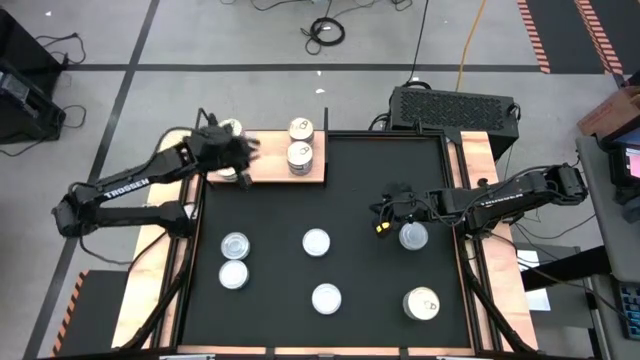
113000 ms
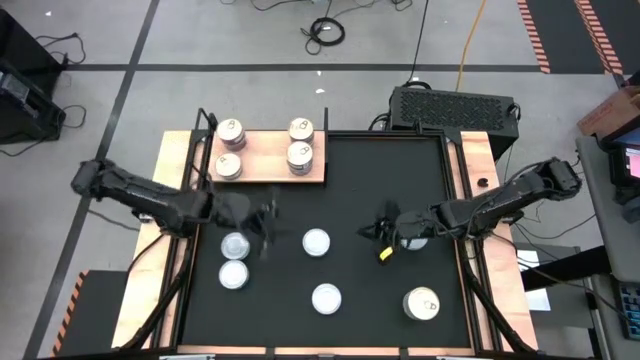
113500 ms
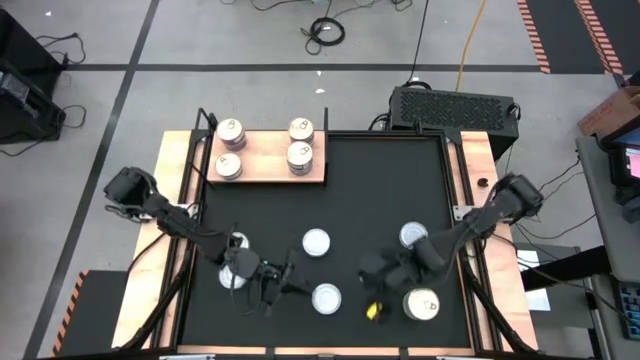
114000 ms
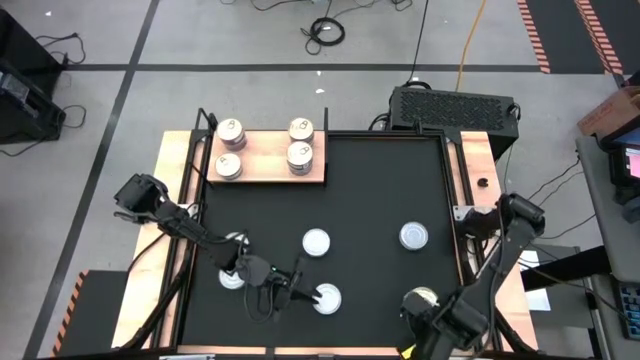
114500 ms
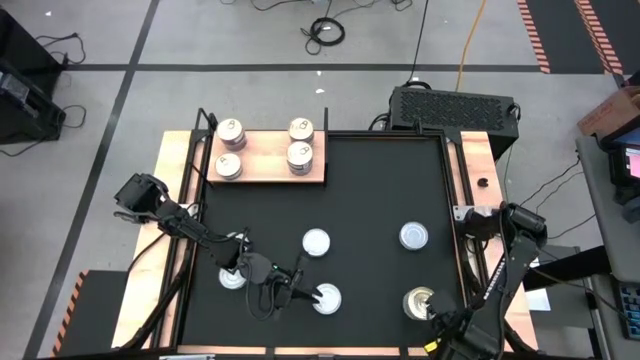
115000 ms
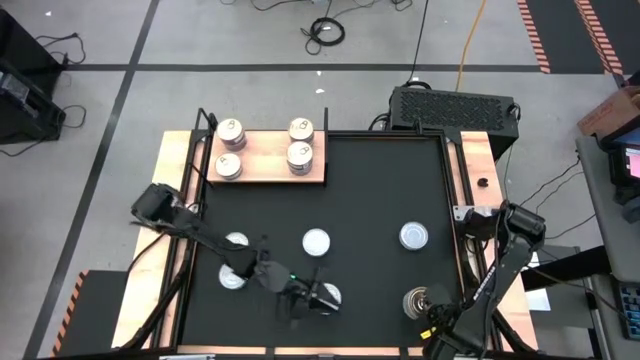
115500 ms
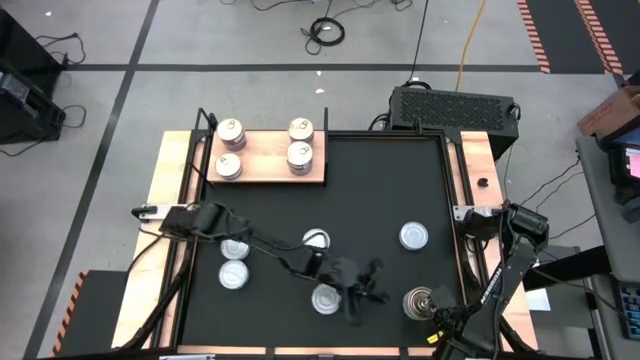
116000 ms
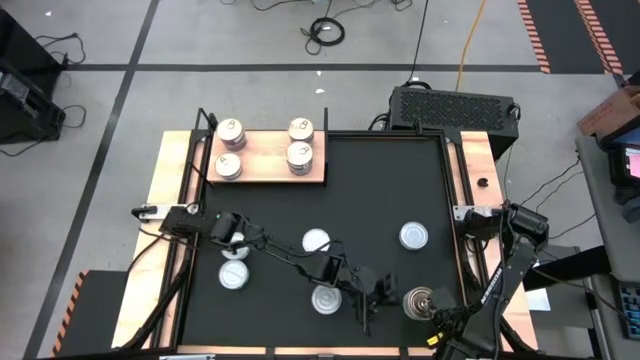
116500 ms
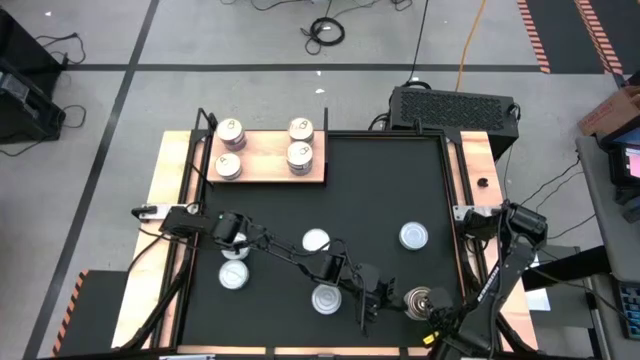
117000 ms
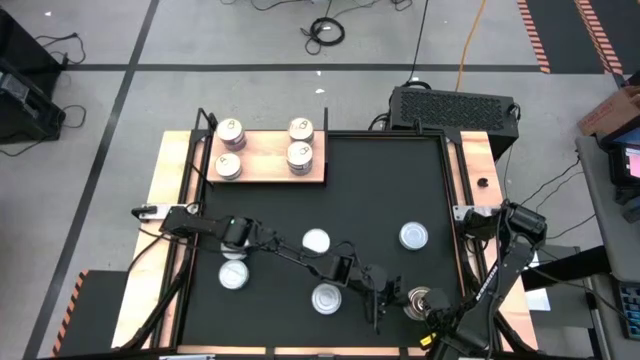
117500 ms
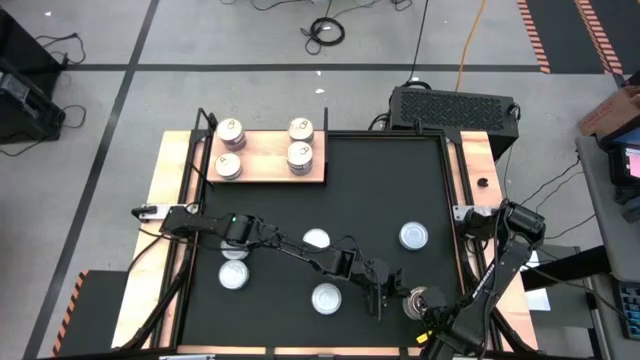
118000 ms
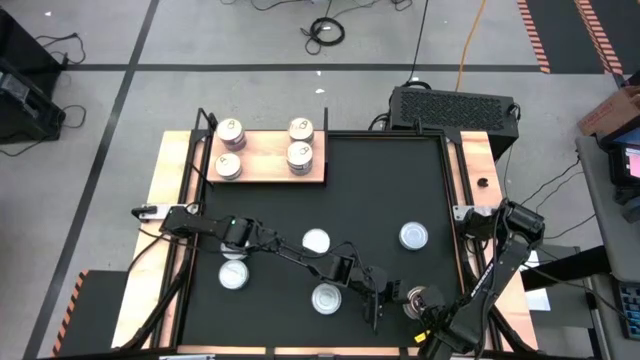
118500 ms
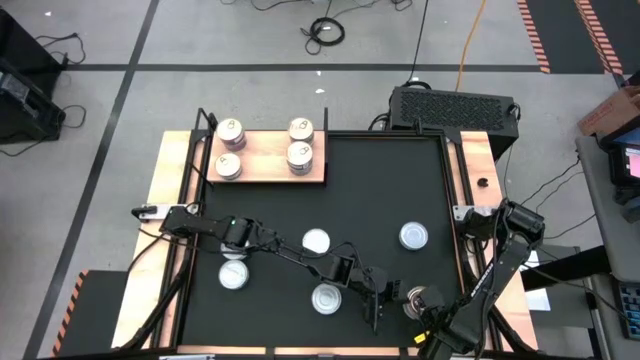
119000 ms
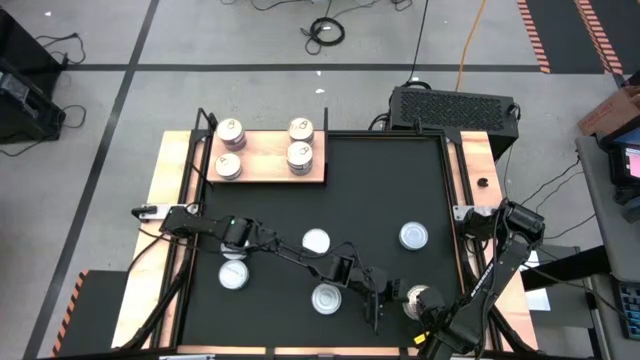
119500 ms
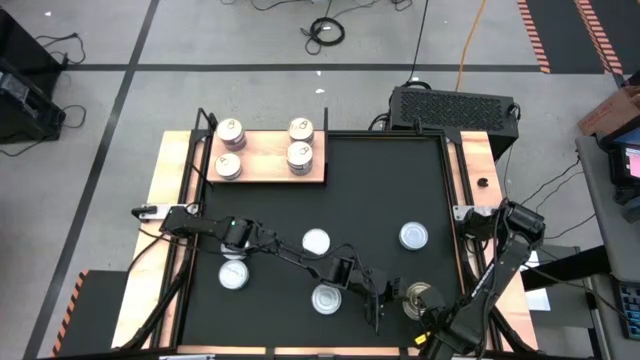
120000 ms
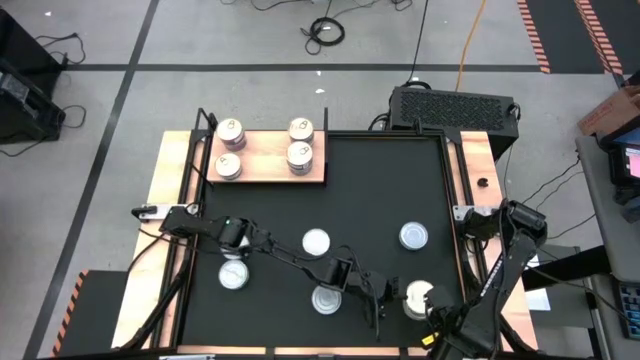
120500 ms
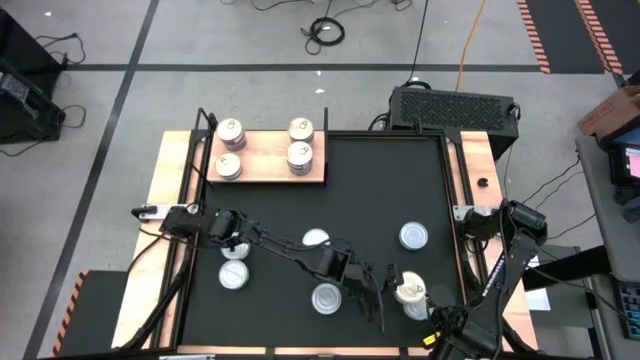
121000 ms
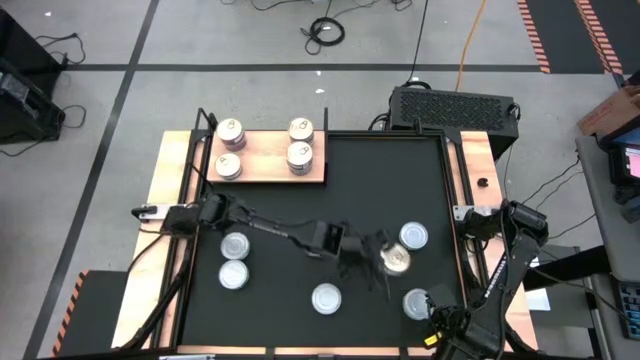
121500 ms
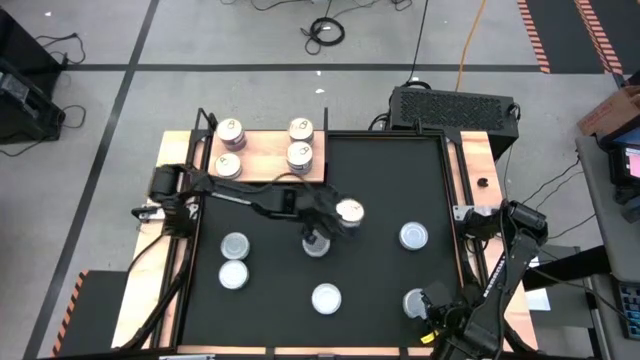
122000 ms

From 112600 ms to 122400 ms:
Task: Stack canned seafood by type on shelf
Stack the blue-pink tuna can on top of the other blue-pink tuna cans on the shelf

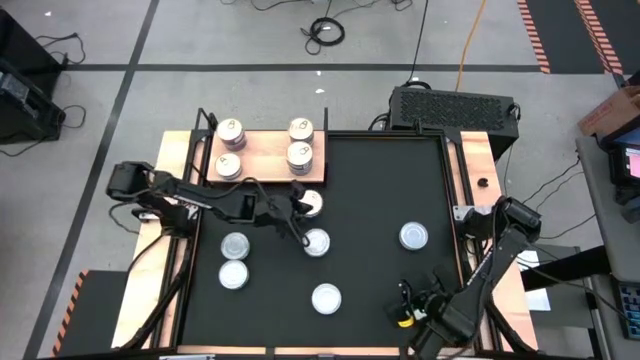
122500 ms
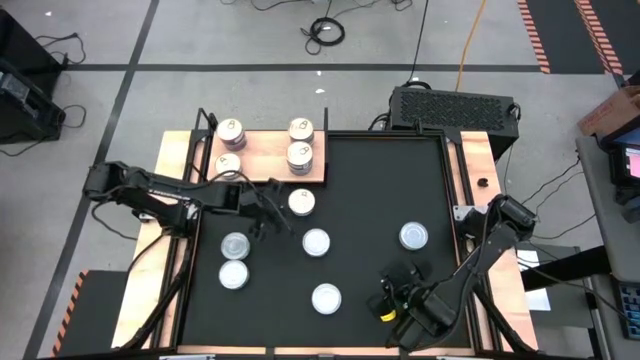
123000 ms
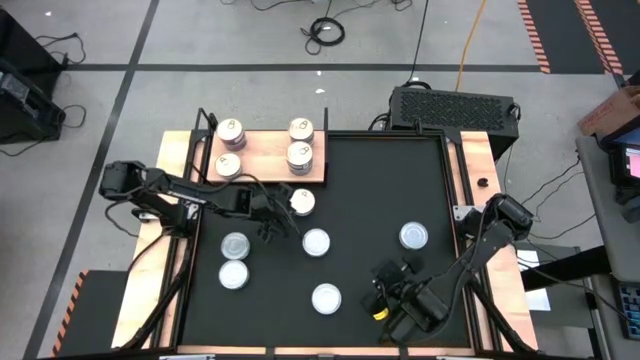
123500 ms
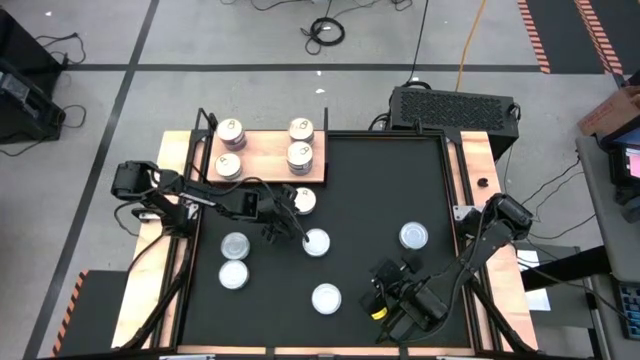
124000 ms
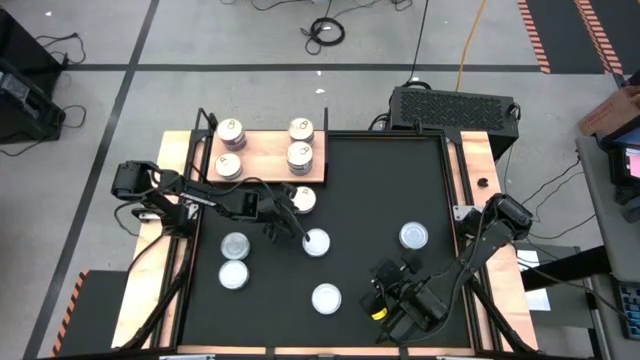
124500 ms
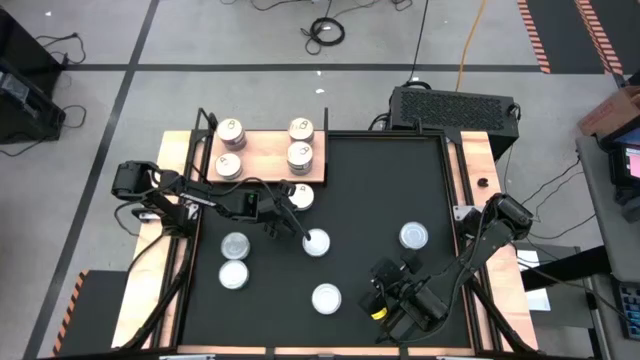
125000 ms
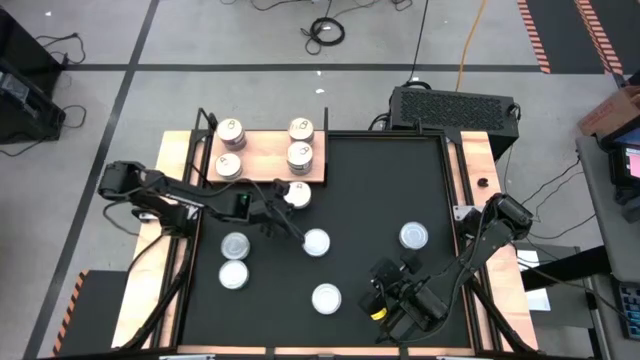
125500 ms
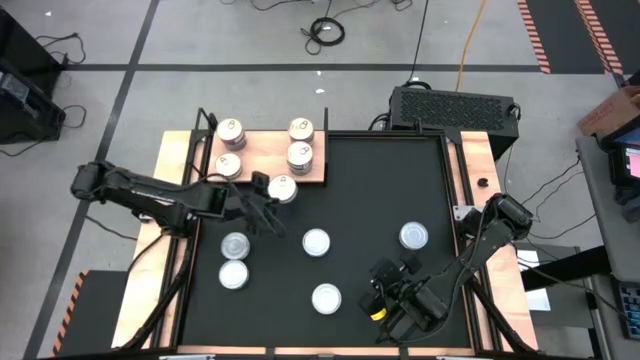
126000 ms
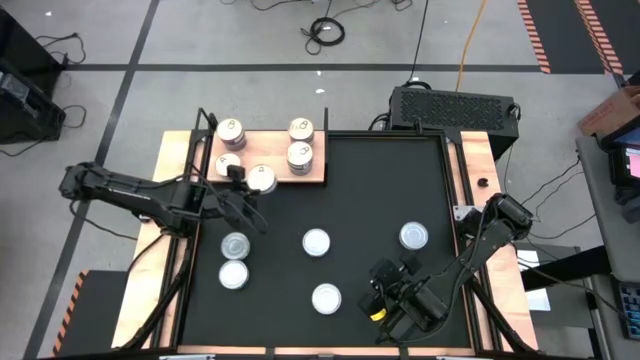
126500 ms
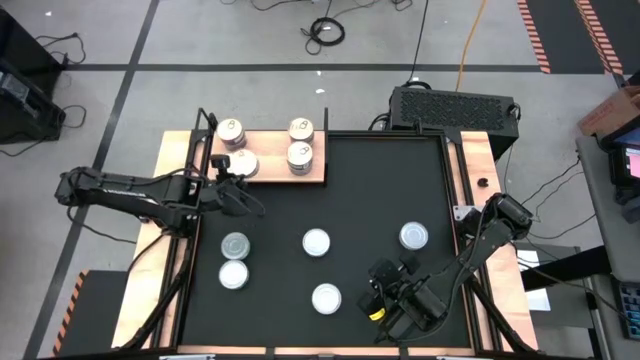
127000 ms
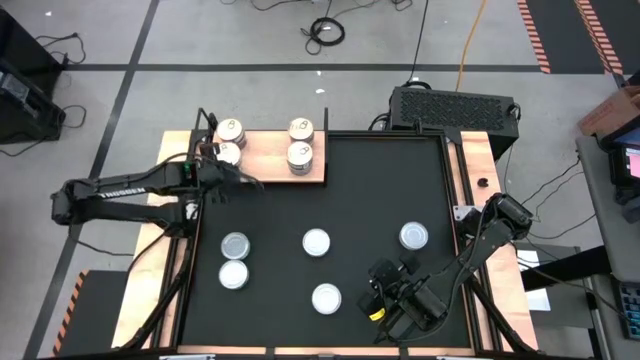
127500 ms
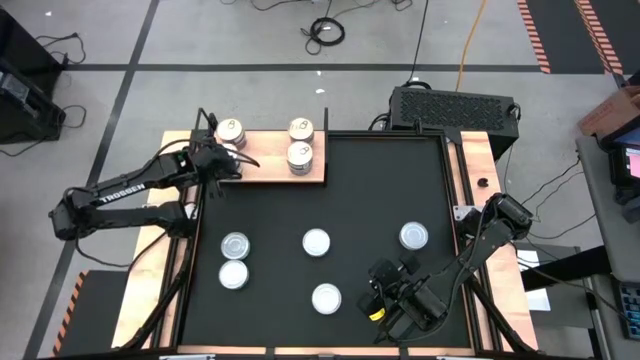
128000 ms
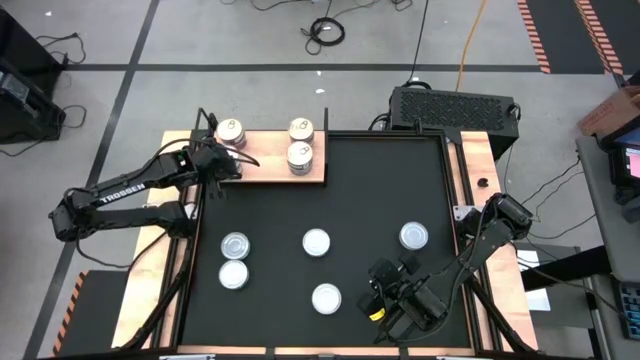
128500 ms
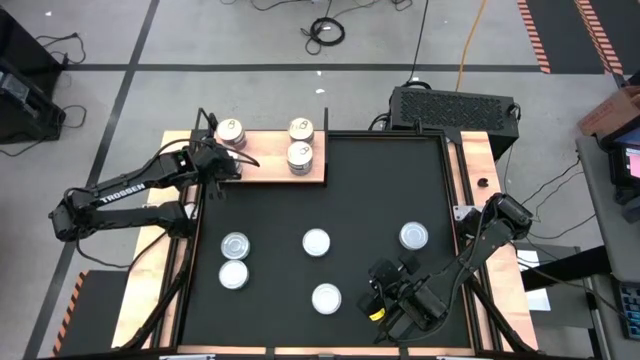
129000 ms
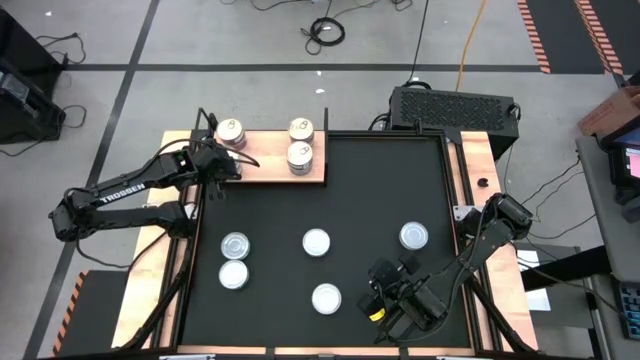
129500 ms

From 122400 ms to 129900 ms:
Stack the blue-pink tuna can on top of the other blue-pink tuna cans on the shelf

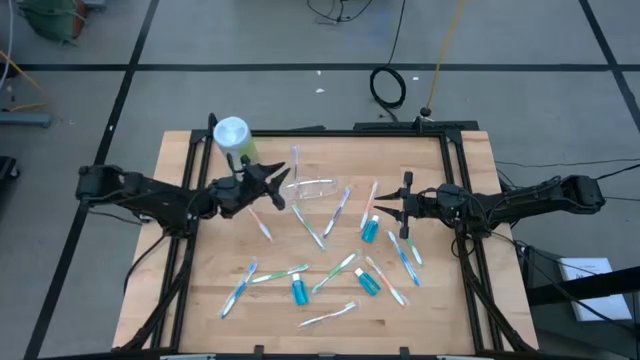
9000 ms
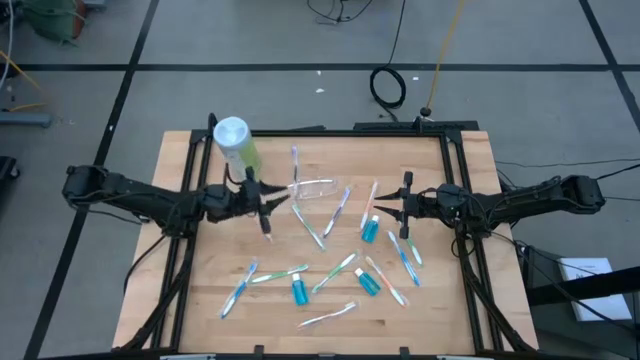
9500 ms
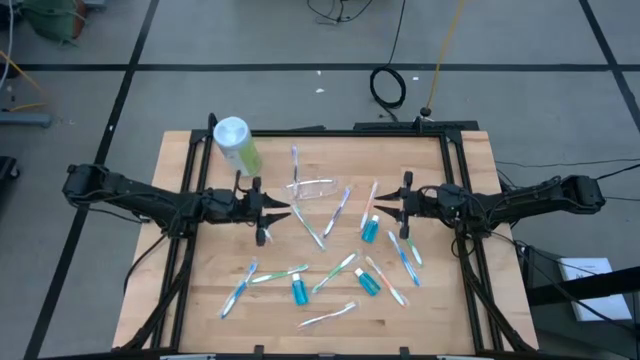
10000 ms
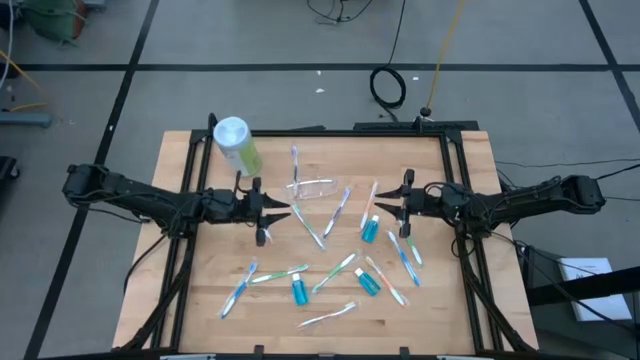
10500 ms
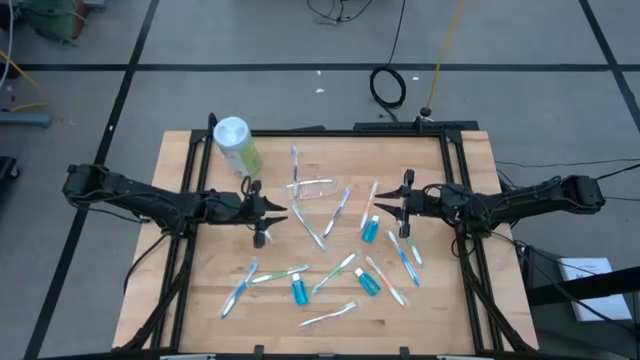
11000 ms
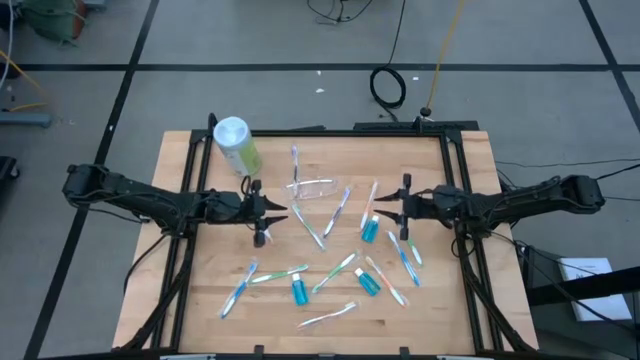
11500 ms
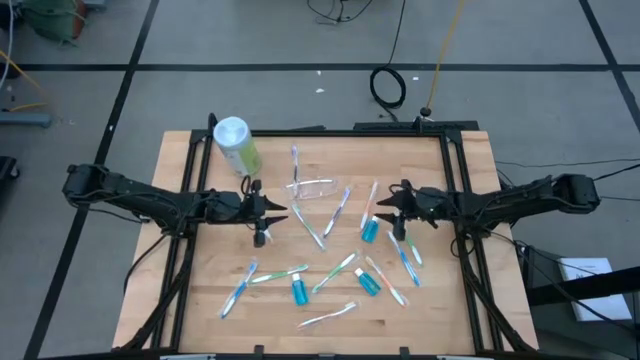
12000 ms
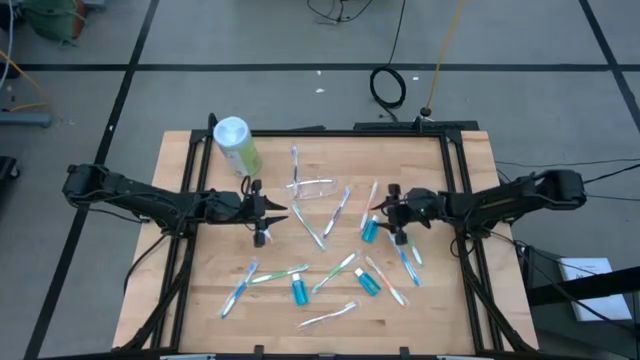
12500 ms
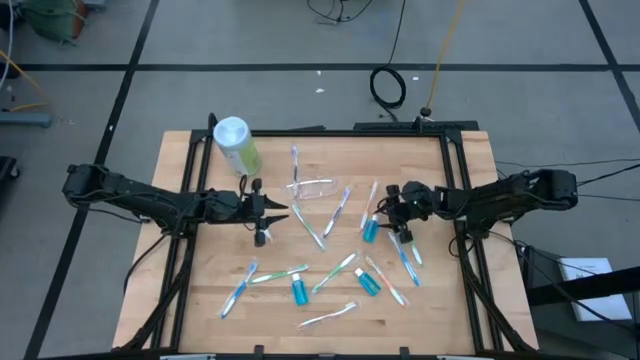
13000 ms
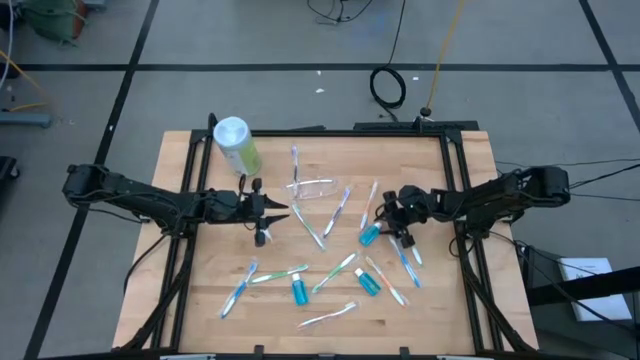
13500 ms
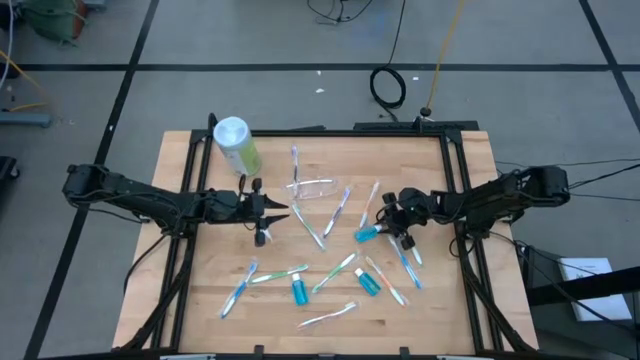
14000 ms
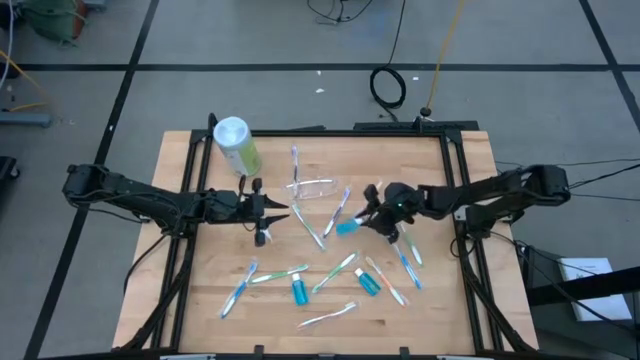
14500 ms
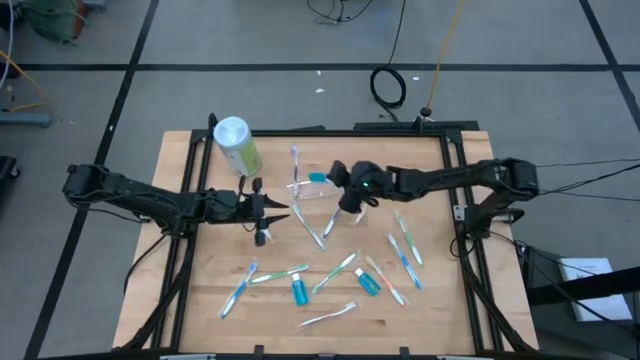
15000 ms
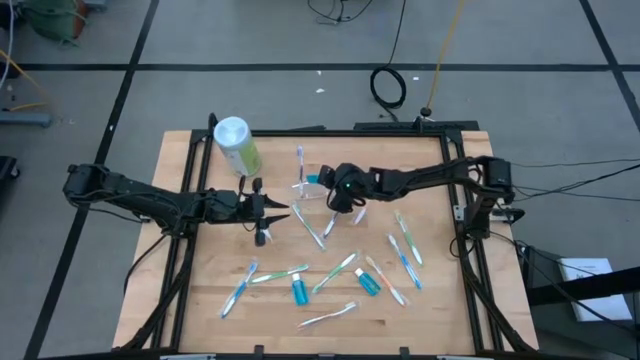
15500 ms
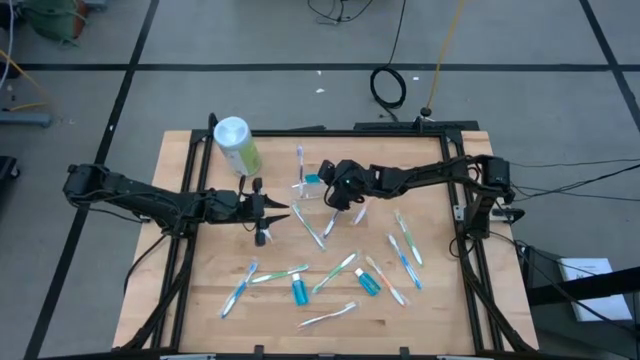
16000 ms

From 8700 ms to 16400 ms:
Task: Pick & Place toothbrushing station
Put the blue mouthwash into the transparent organizer
